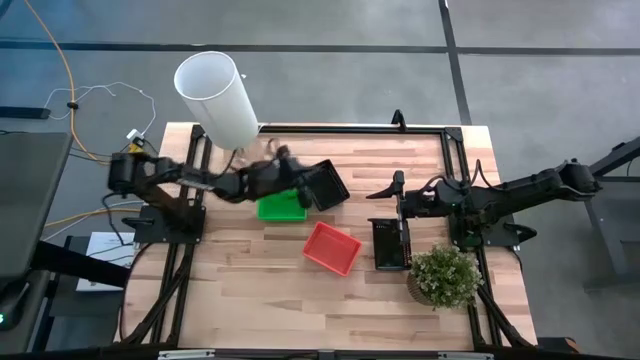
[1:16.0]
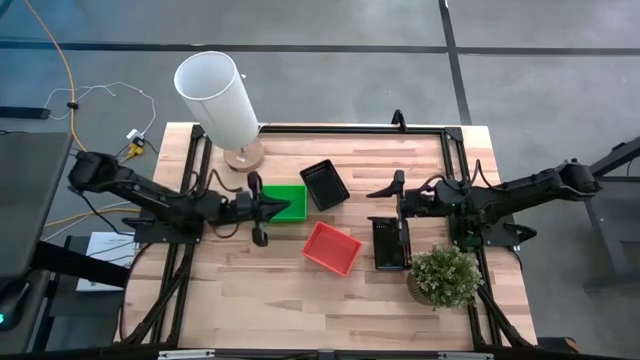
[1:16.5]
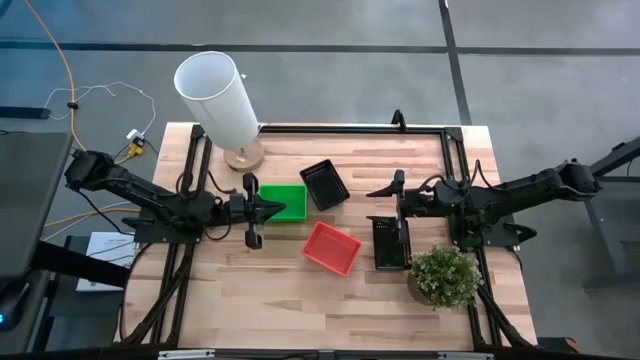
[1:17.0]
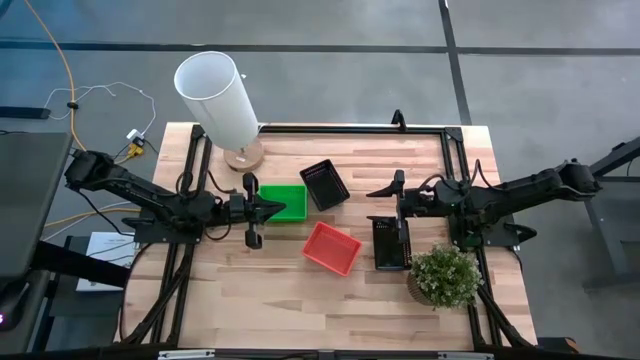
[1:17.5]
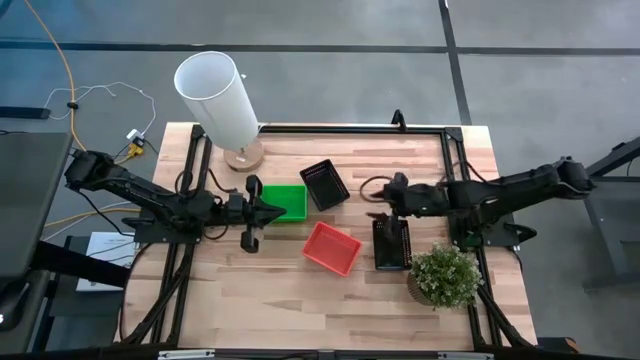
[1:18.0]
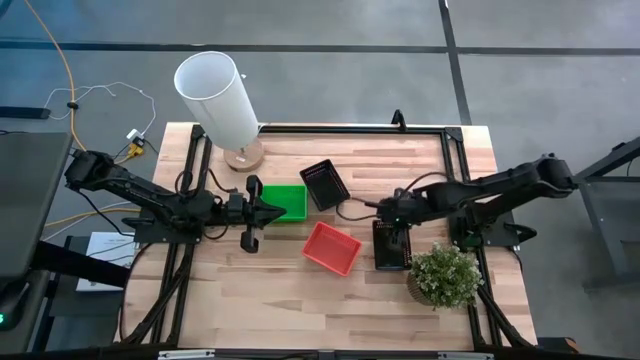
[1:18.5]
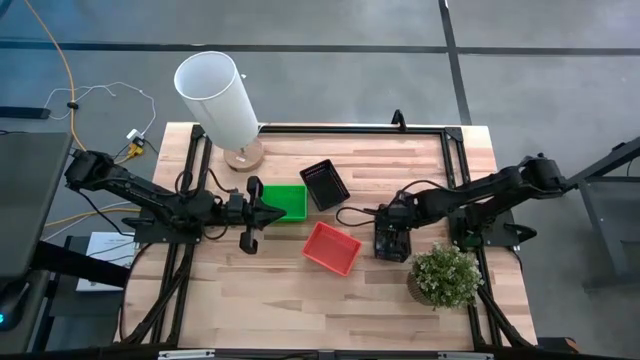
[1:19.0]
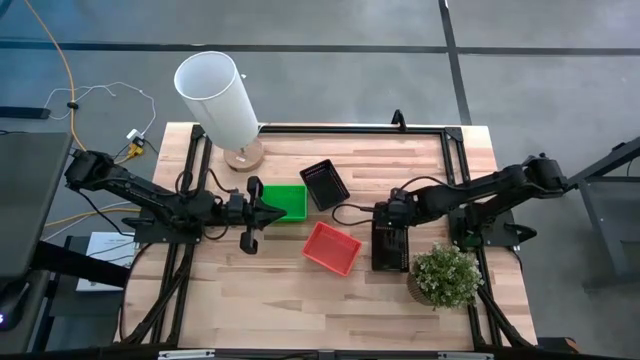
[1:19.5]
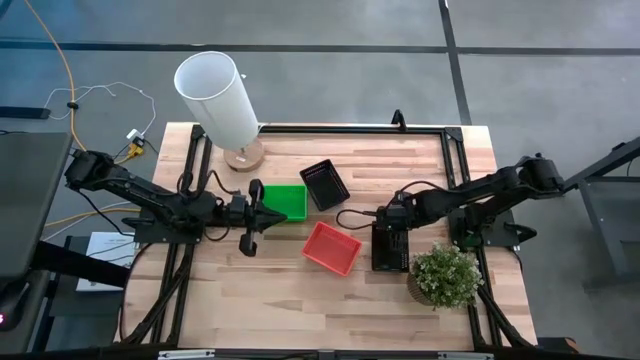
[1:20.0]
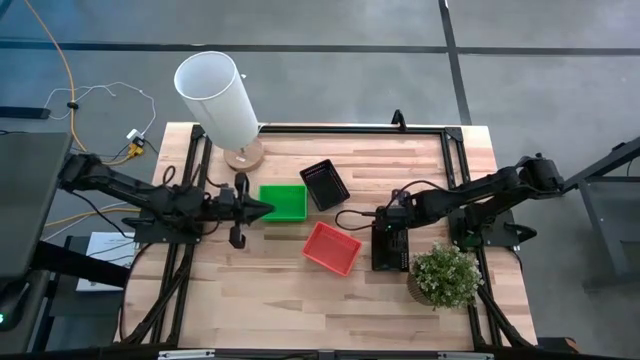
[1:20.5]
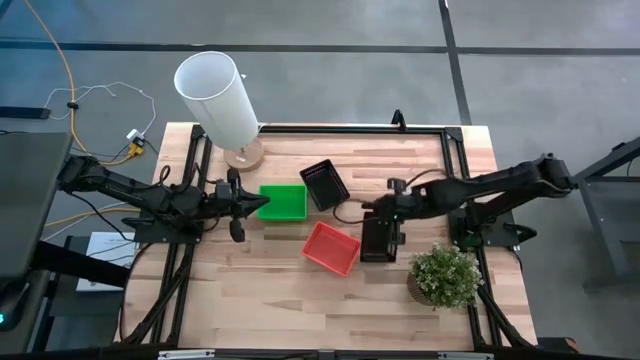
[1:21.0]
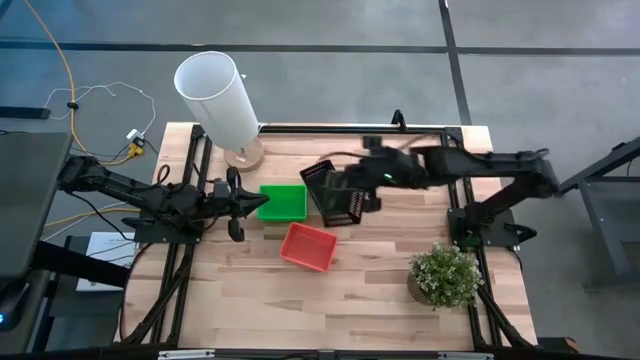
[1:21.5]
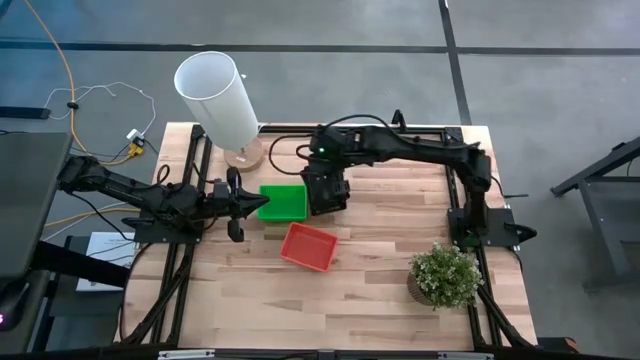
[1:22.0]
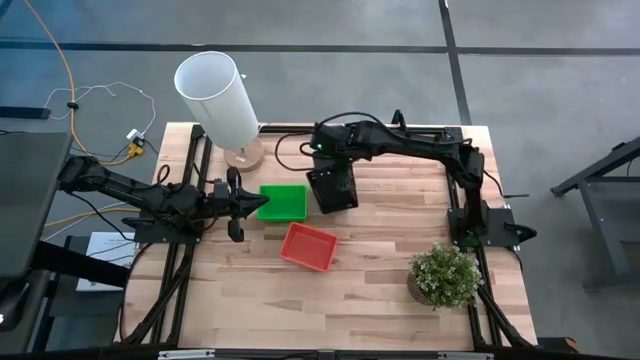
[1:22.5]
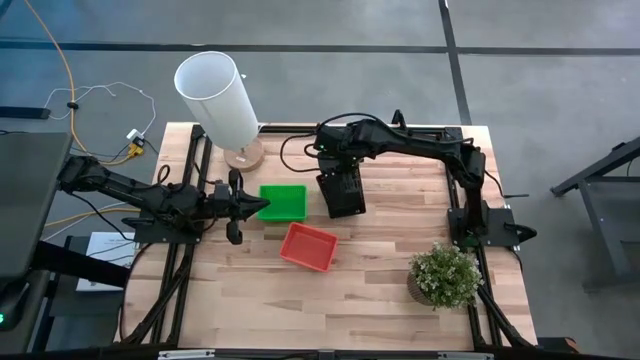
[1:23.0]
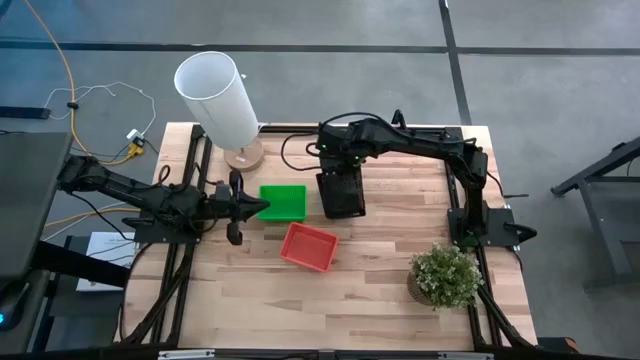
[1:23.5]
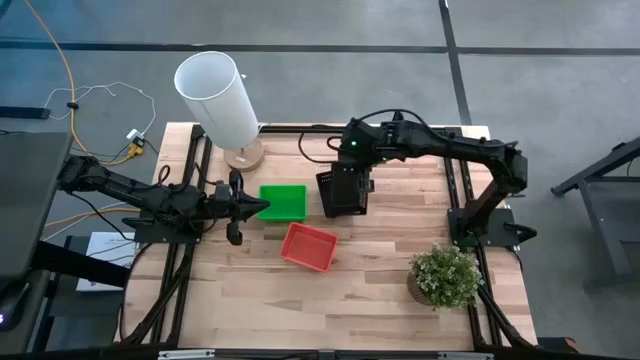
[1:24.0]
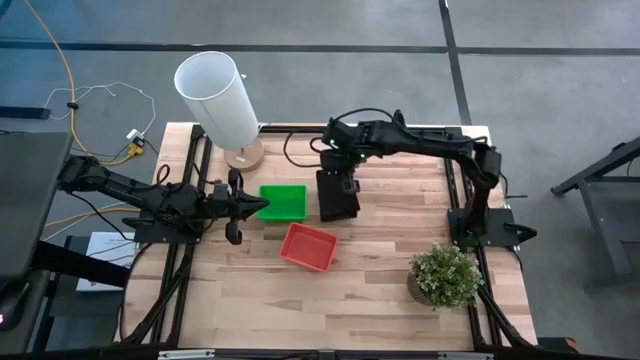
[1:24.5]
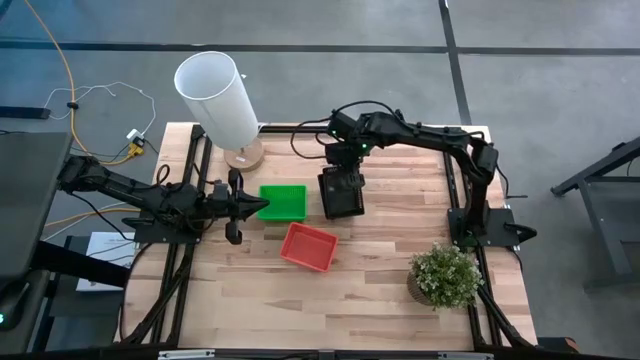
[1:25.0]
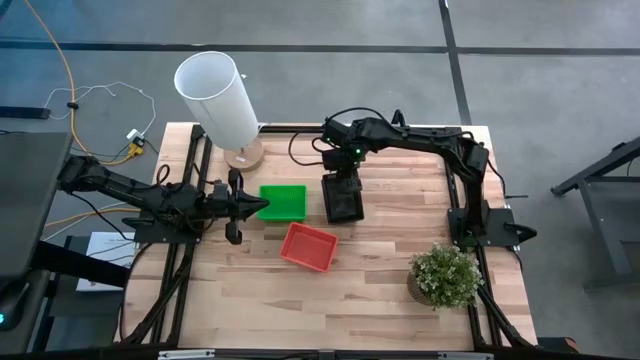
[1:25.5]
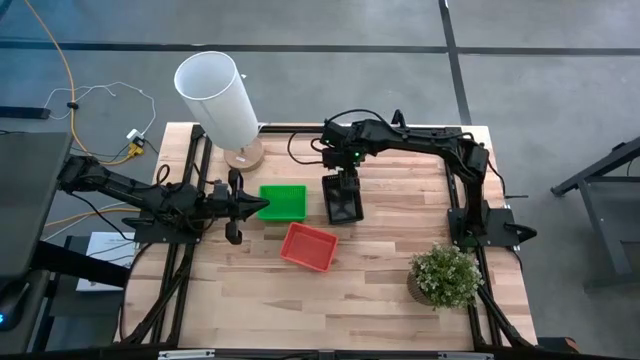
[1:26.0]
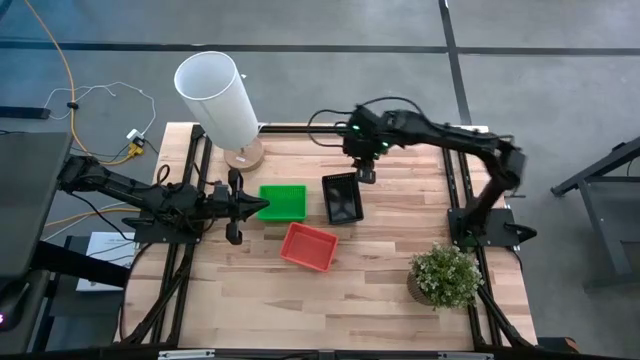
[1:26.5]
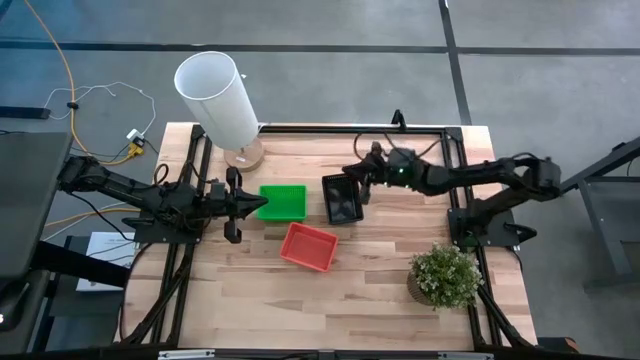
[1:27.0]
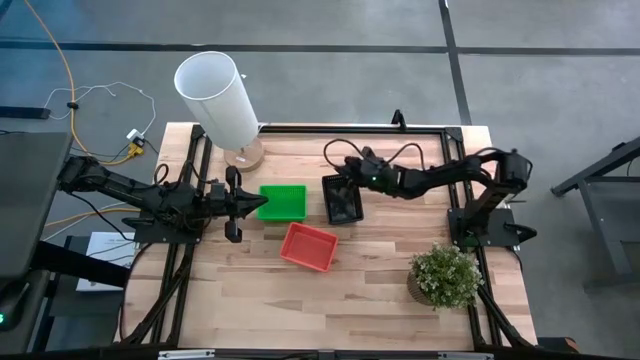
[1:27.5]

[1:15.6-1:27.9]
Stack the black bin on the black bin

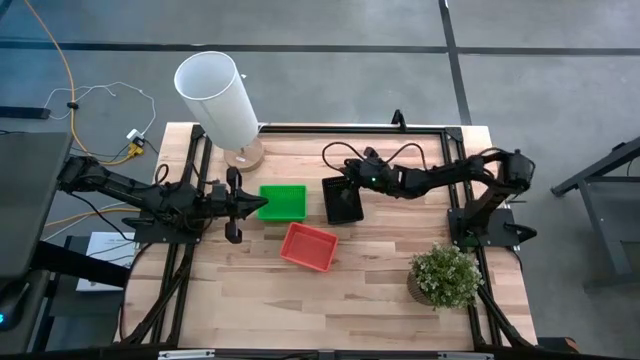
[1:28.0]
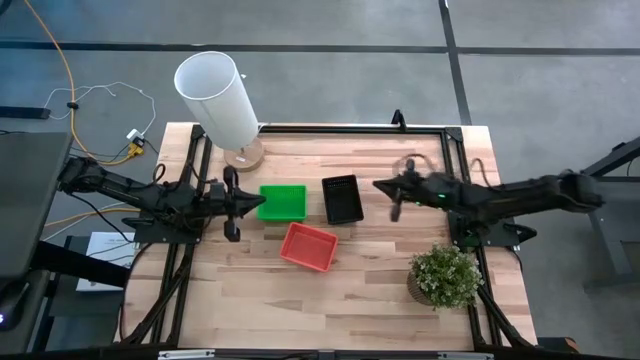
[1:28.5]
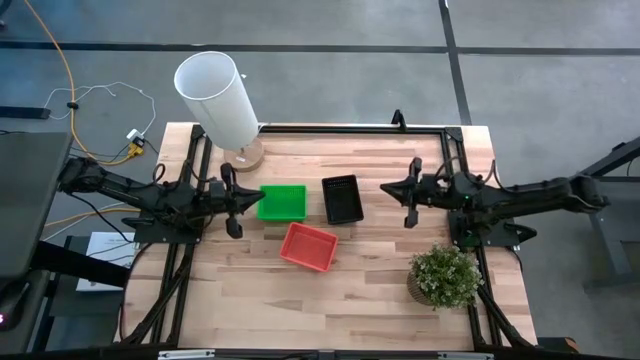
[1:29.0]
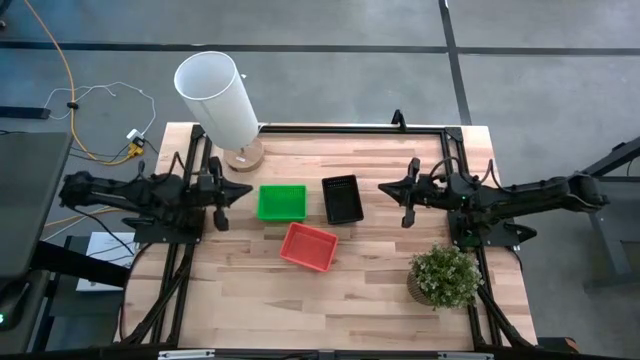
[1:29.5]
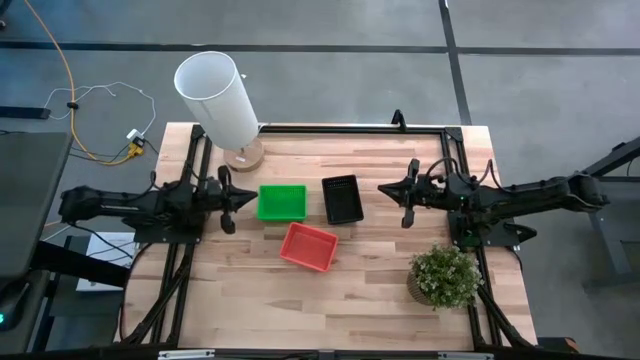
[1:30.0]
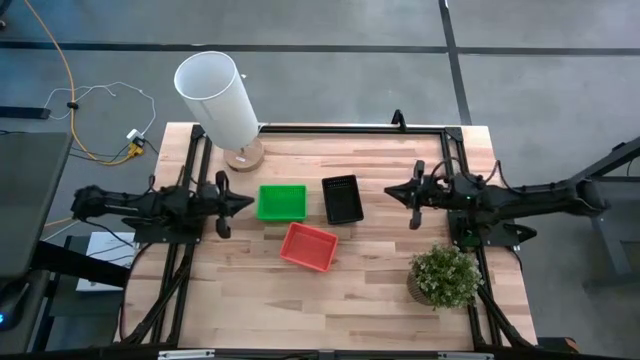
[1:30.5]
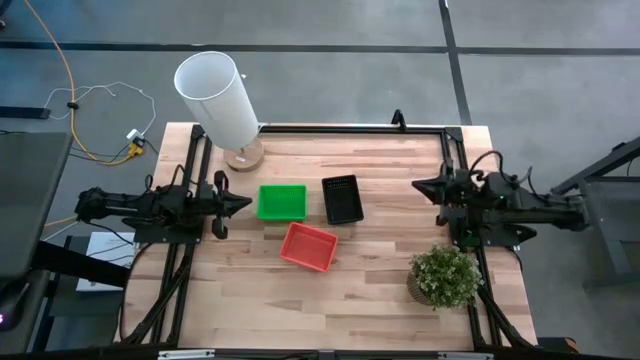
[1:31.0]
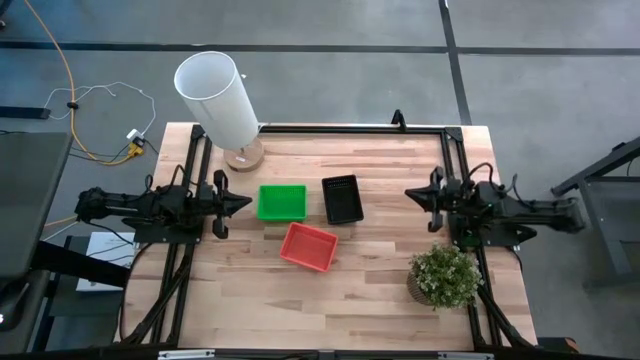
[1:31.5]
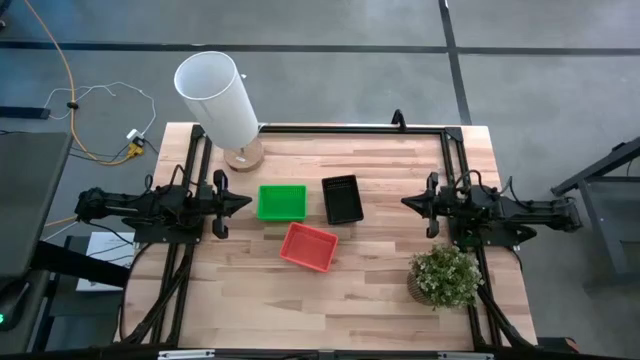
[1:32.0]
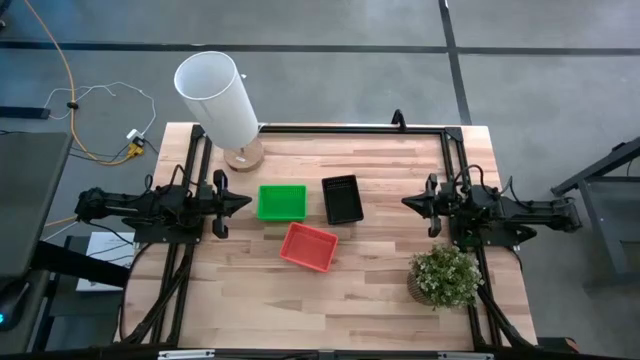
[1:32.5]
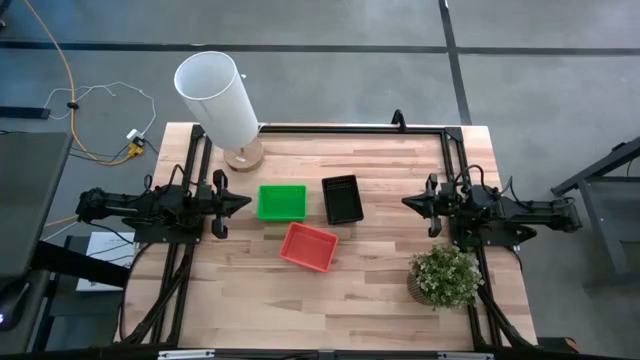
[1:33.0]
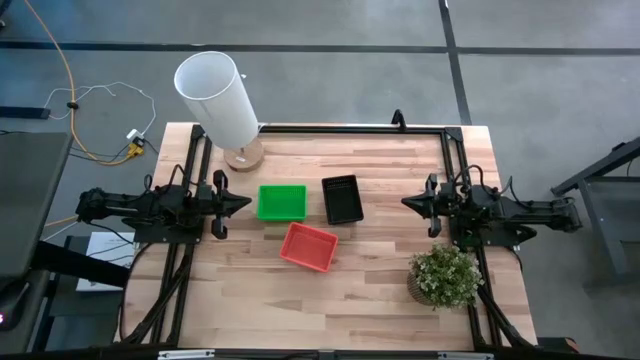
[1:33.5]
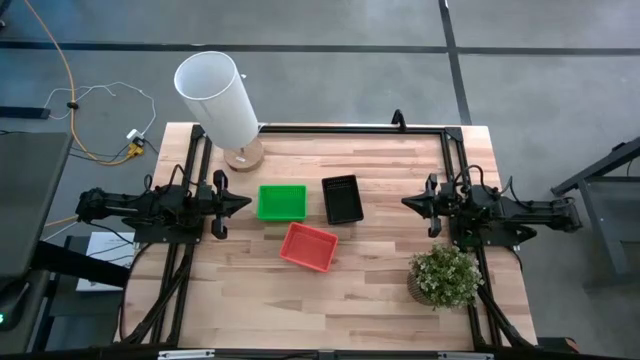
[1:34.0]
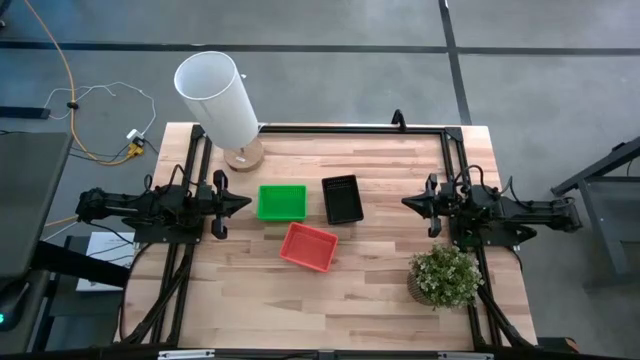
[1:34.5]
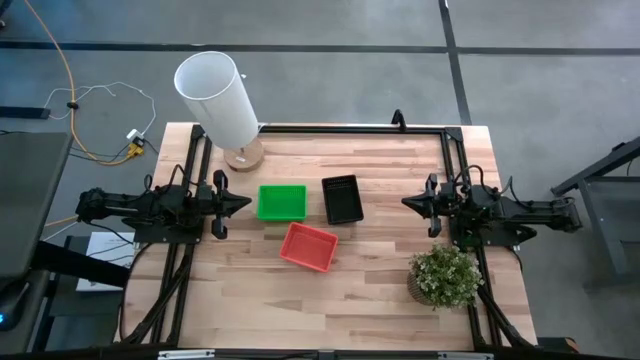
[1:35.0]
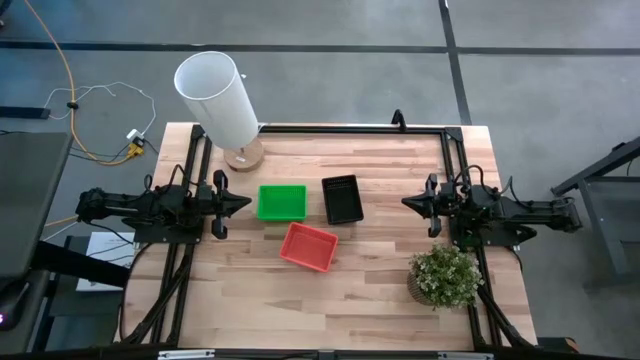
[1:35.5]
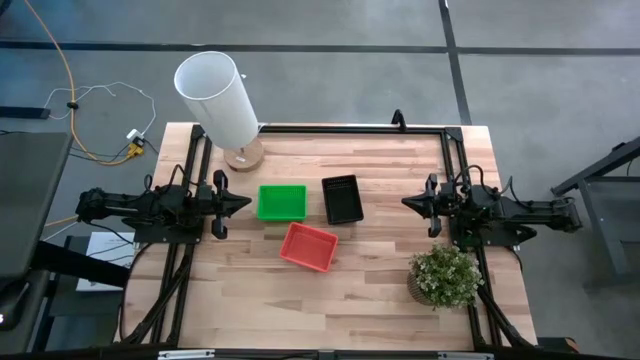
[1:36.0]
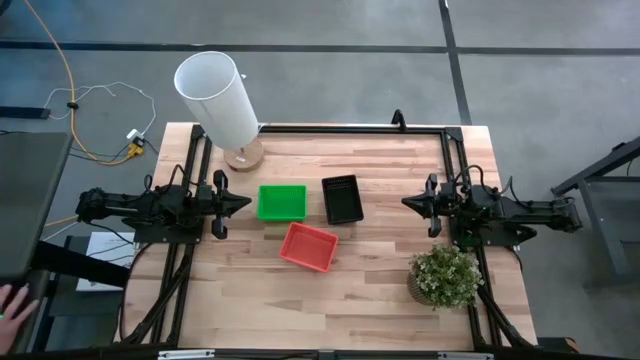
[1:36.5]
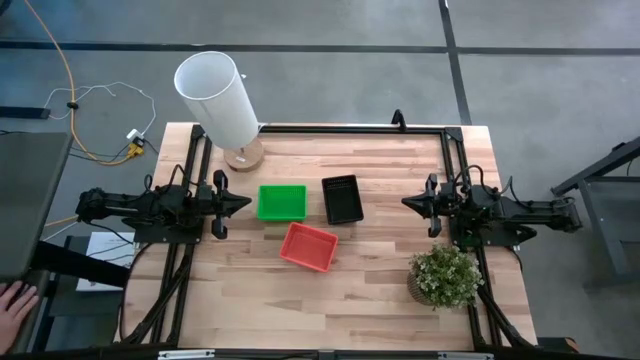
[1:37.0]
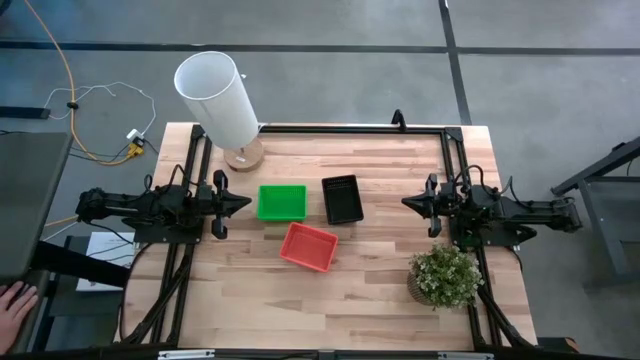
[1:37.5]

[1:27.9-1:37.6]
Return to Home Position
